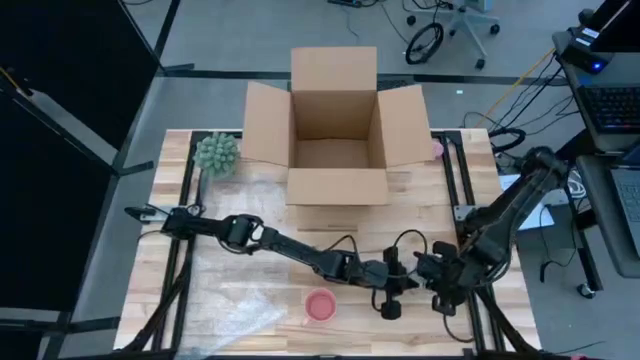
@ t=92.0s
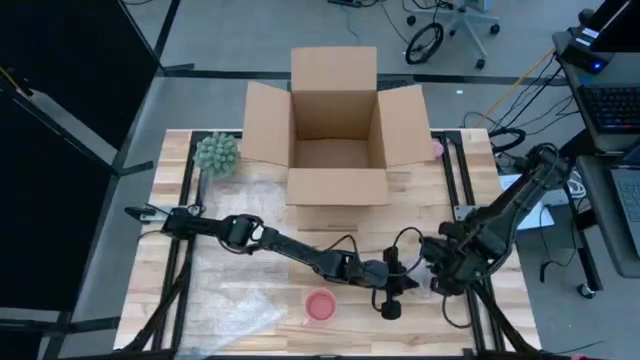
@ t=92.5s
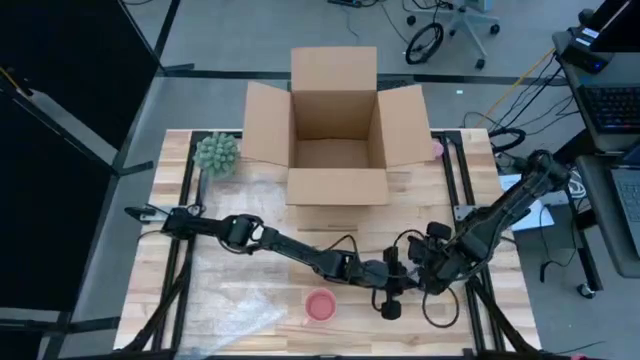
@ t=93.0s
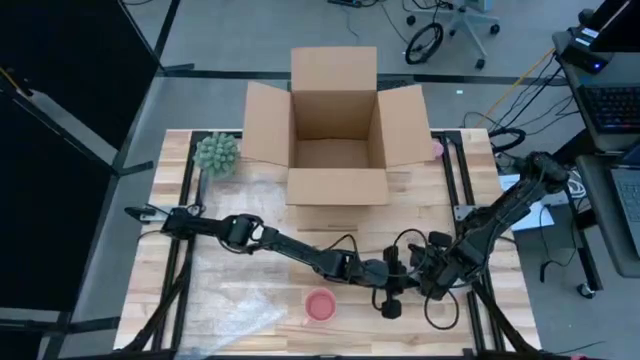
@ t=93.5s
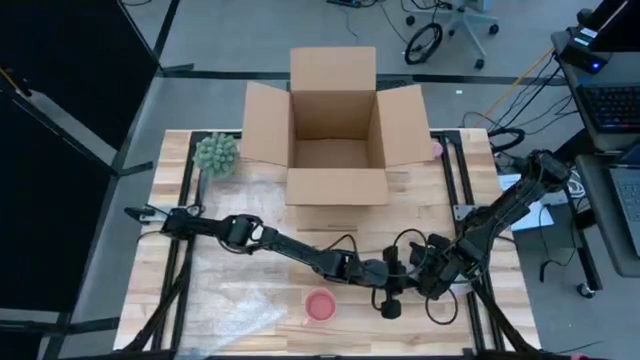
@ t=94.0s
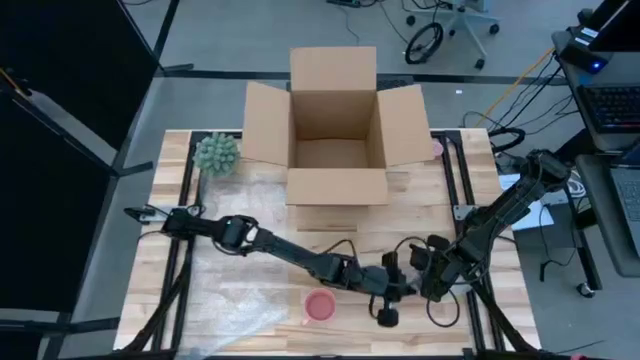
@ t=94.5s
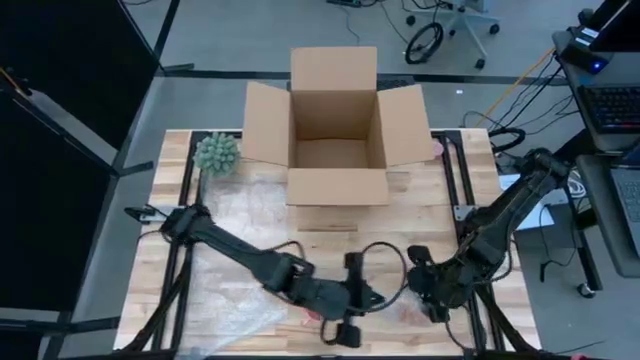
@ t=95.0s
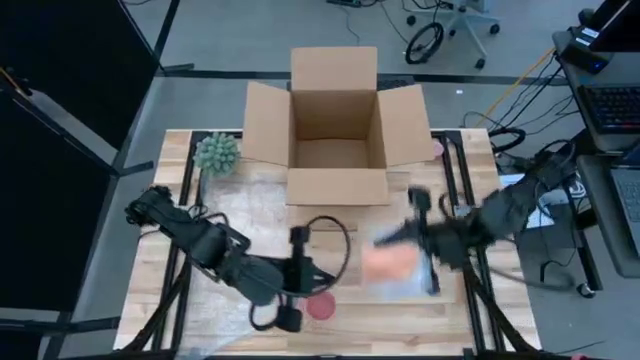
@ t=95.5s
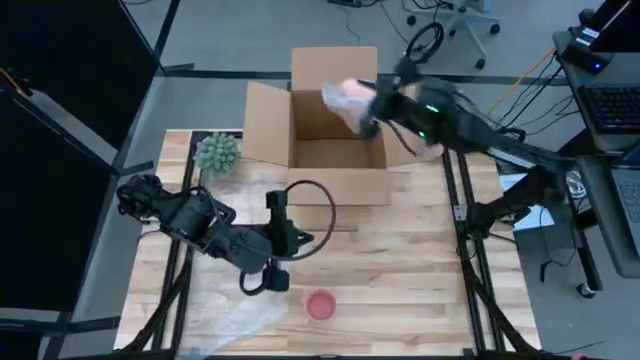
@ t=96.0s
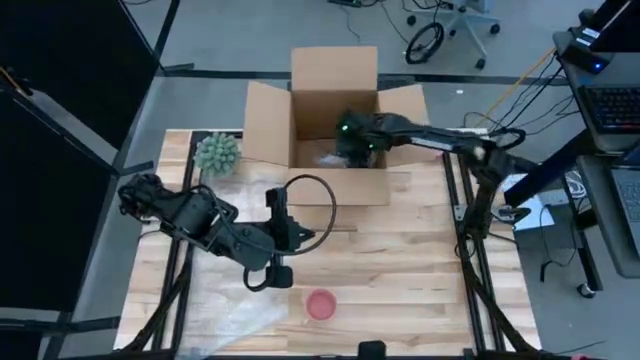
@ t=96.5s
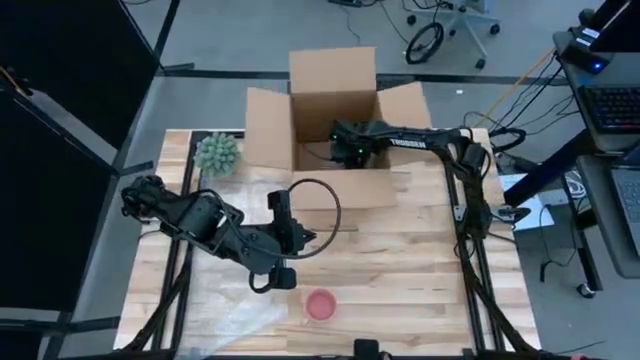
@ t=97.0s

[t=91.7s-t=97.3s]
Task: wrap mug
Put the yellow wrapped mug into the box

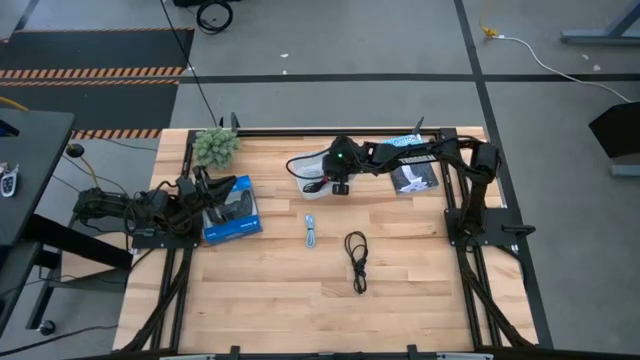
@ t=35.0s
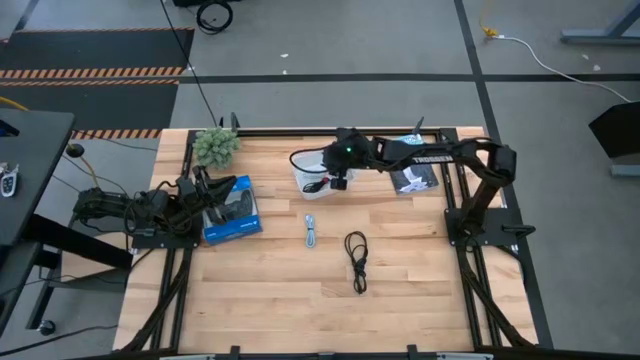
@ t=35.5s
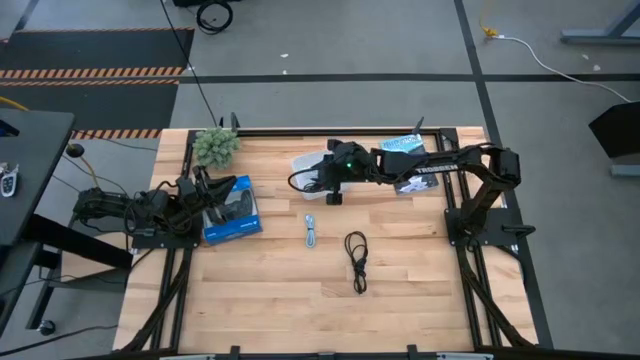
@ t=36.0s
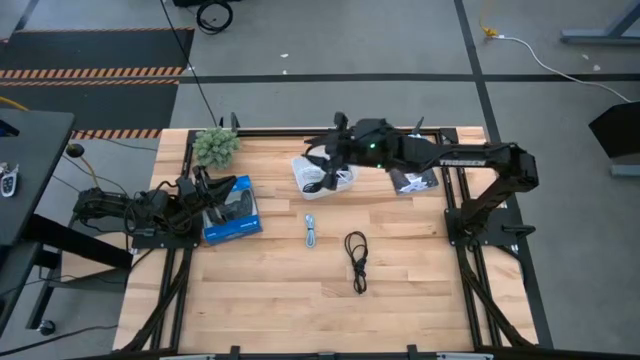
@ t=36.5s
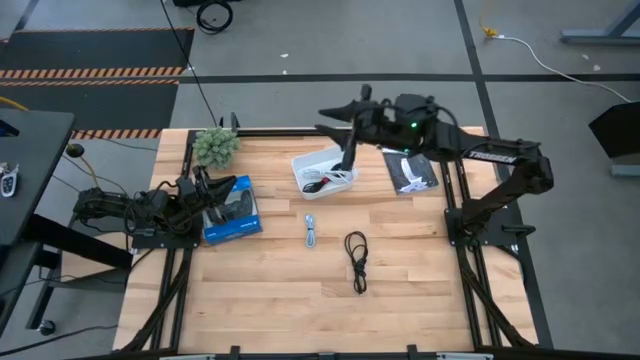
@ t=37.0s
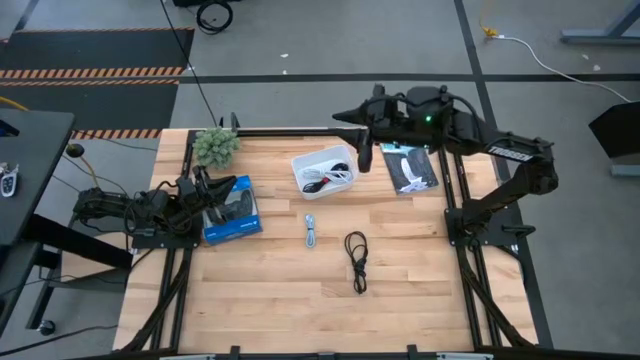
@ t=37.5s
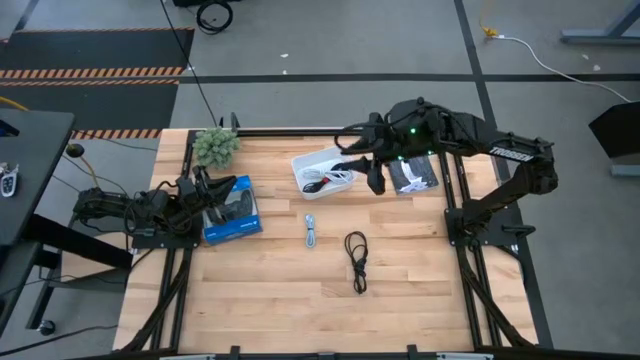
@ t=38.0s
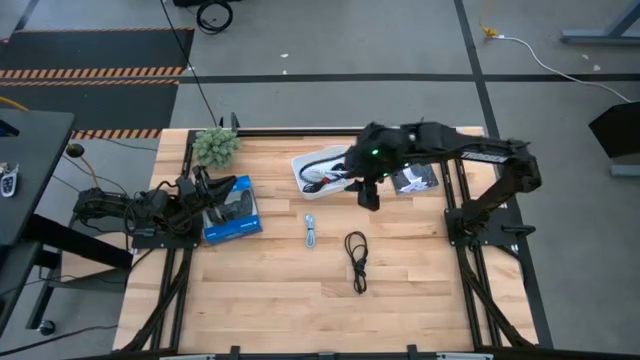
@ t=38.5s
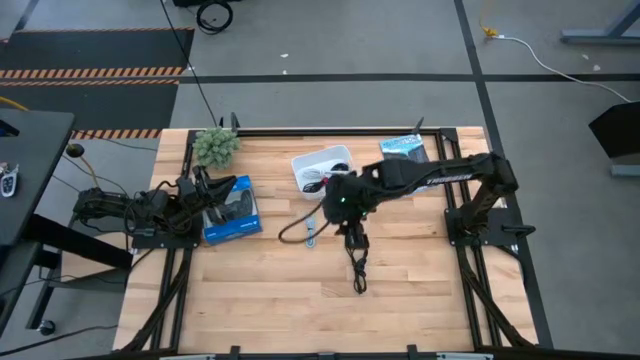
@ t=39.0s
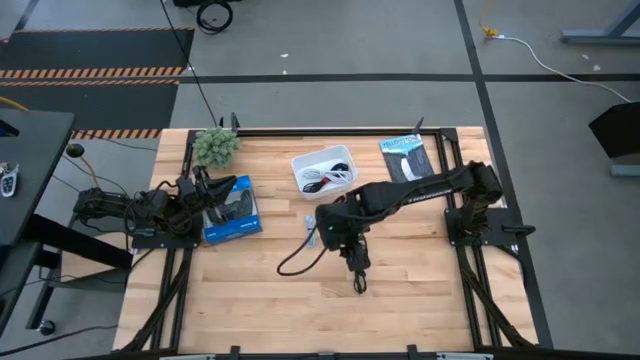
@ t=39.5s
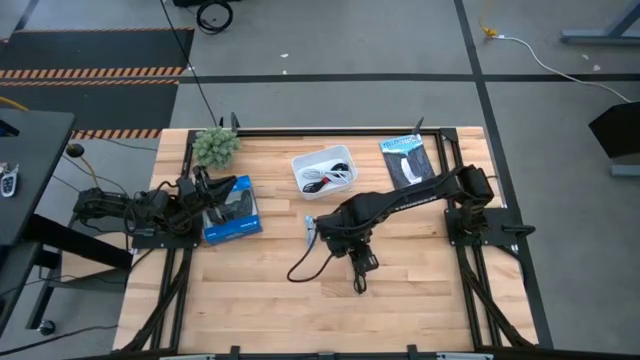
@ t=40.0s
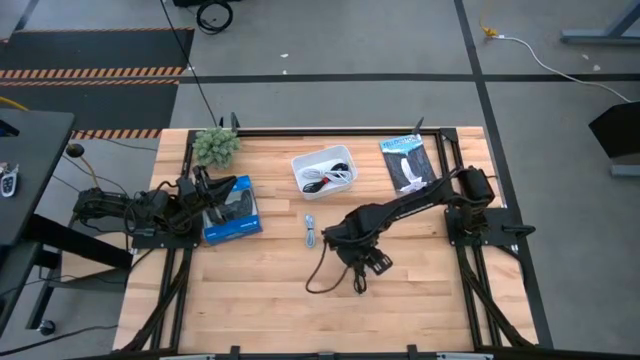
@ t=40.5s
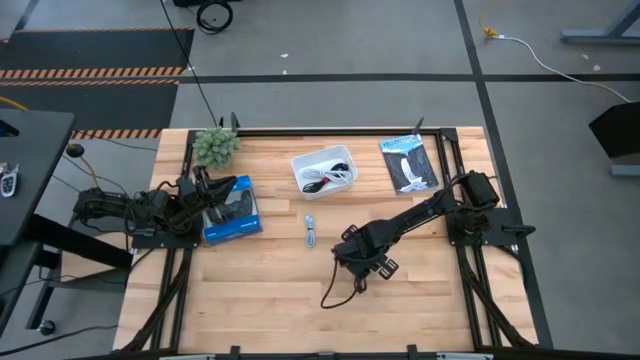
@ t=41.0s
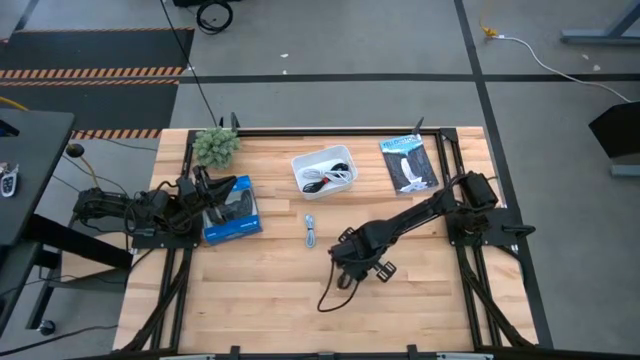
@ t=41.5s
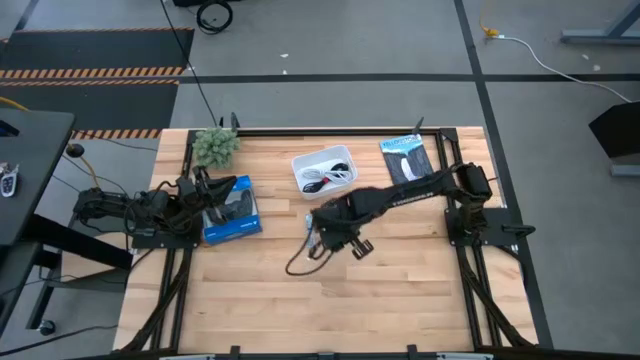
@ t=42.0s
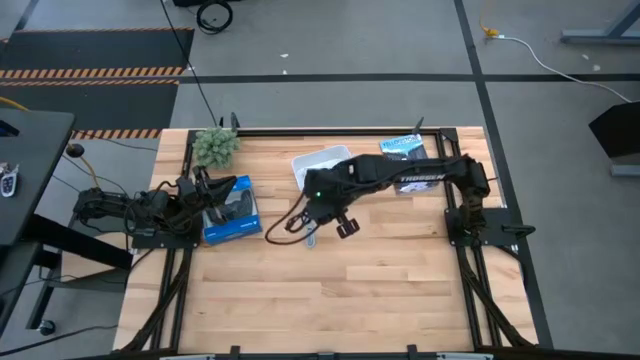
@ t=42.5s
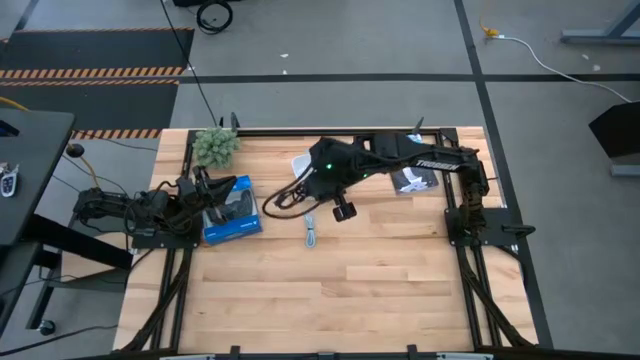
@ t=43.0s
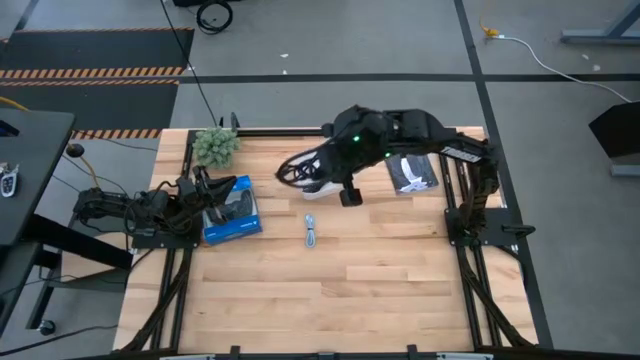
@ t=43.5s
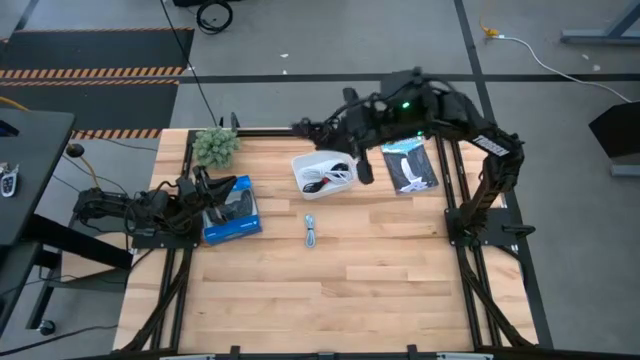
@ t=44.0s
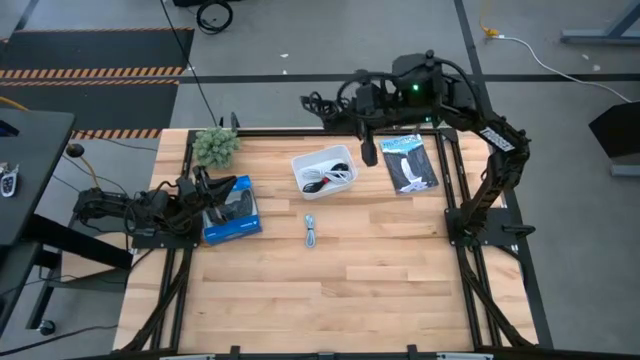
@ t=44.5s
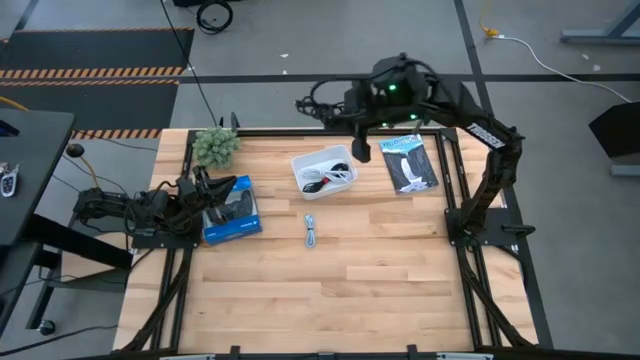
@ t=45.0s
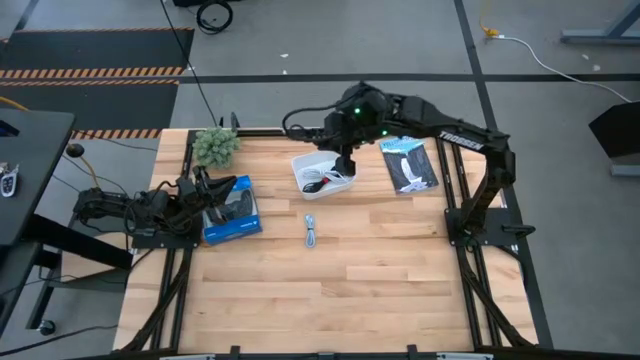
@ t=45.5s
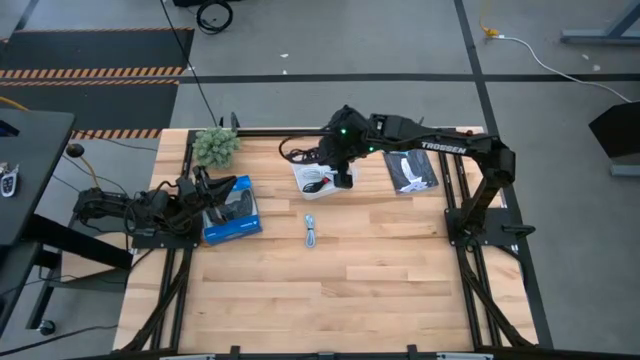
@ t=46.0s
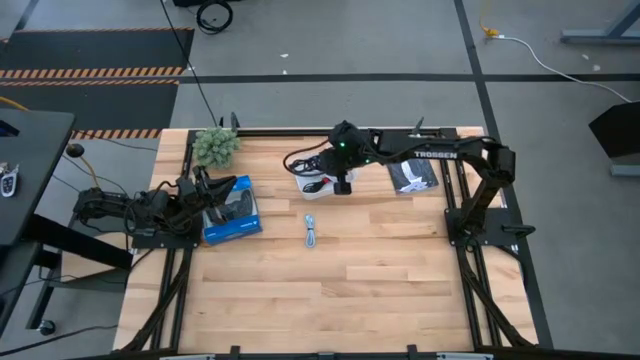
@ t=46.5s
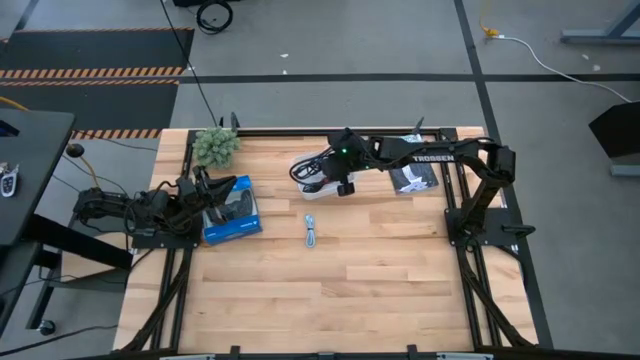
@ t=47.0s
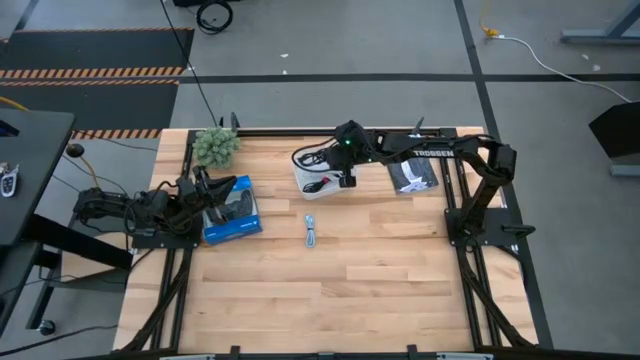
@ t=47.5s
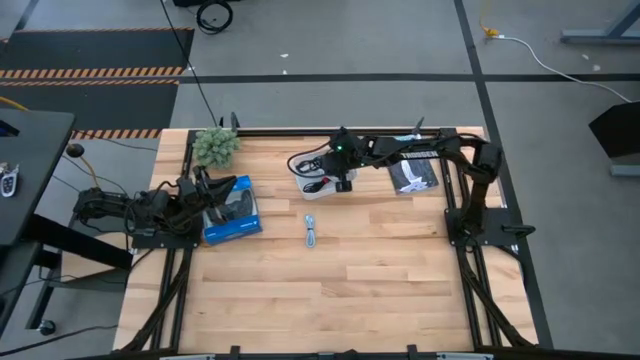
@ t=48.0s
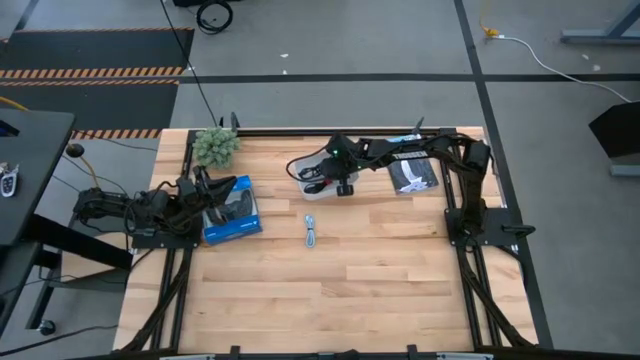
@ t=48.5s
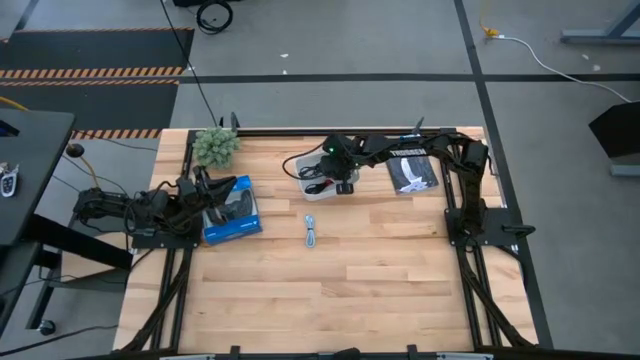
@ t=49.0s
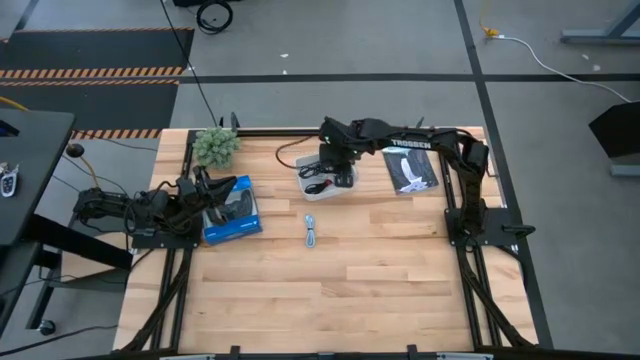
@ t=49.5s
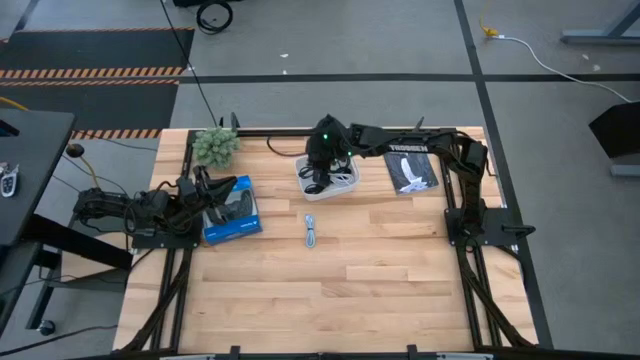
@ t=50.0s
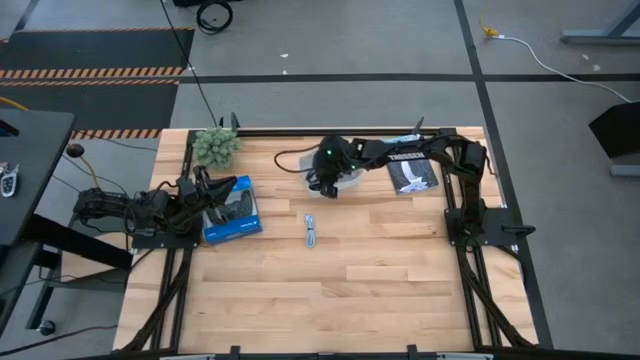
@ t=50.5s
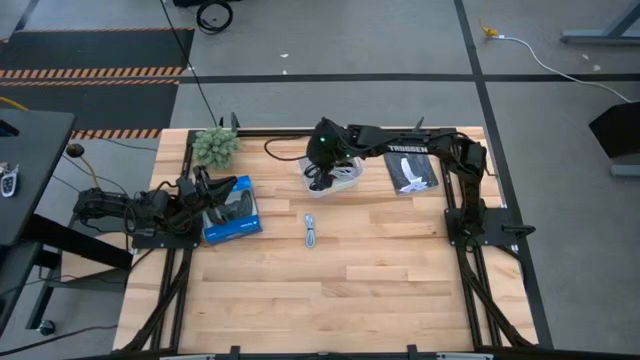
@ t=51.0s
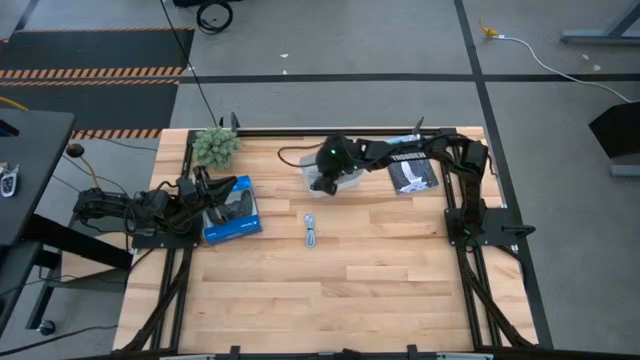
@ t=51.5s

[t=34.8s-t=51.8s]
Task: Pick and place USB-C Cables
Put the black USB cable into the white bin
